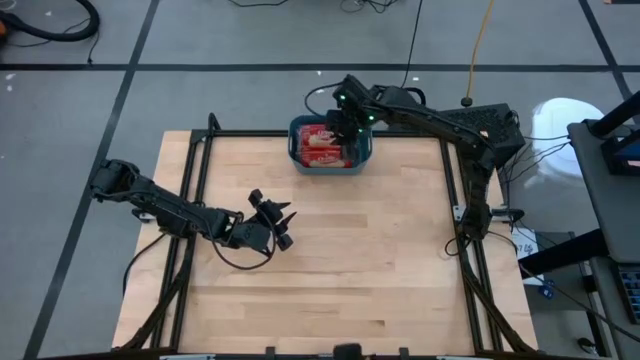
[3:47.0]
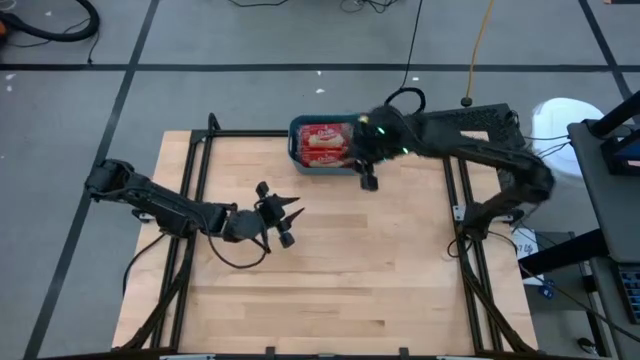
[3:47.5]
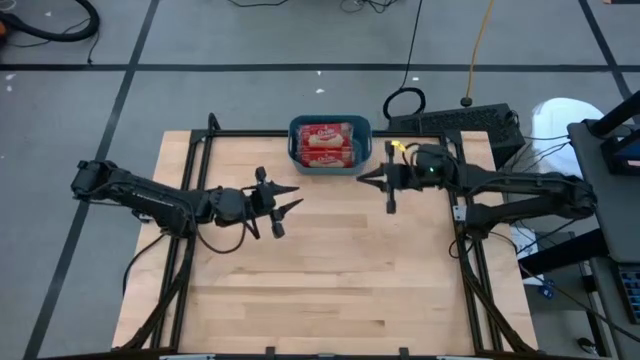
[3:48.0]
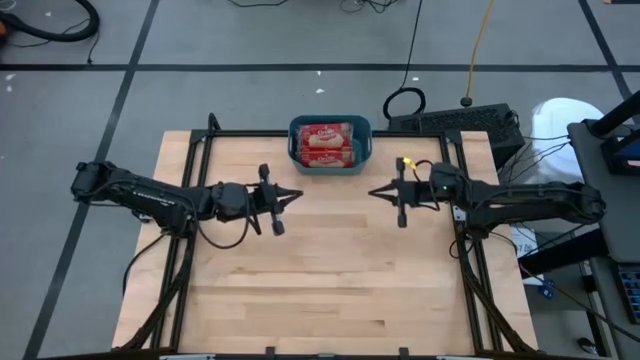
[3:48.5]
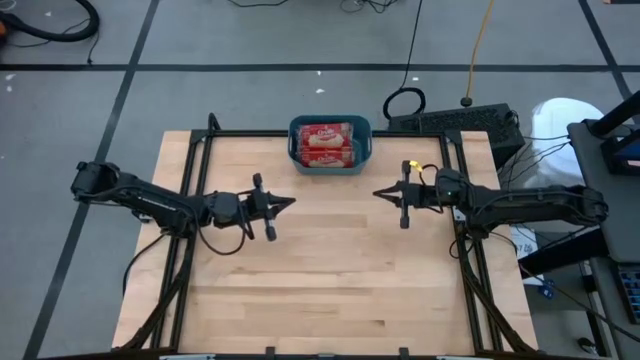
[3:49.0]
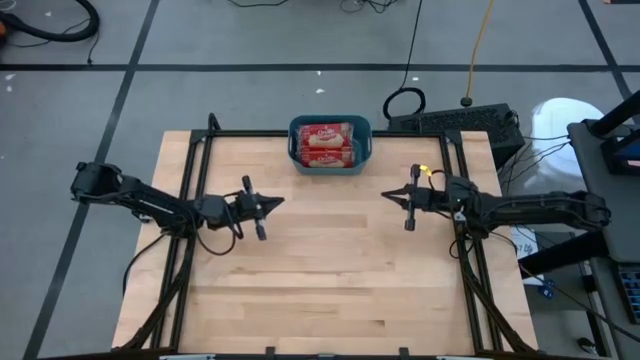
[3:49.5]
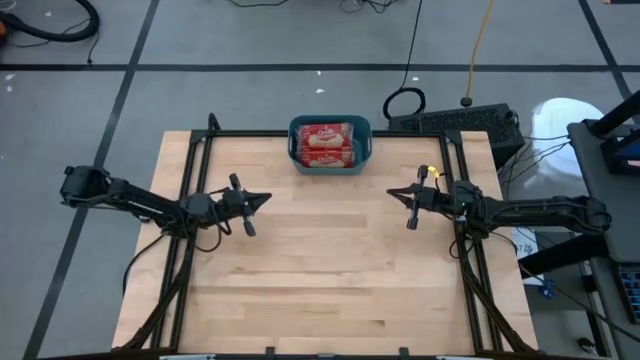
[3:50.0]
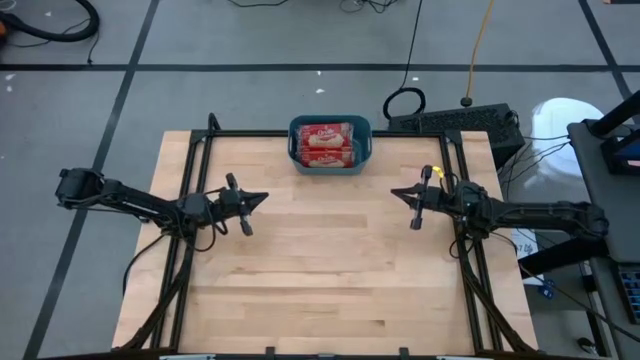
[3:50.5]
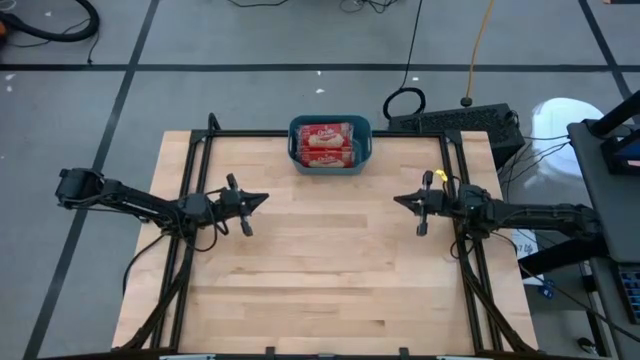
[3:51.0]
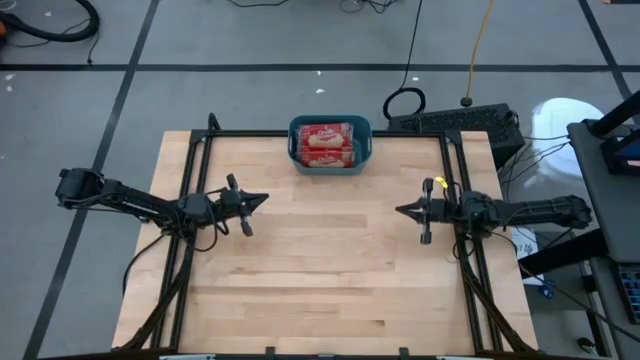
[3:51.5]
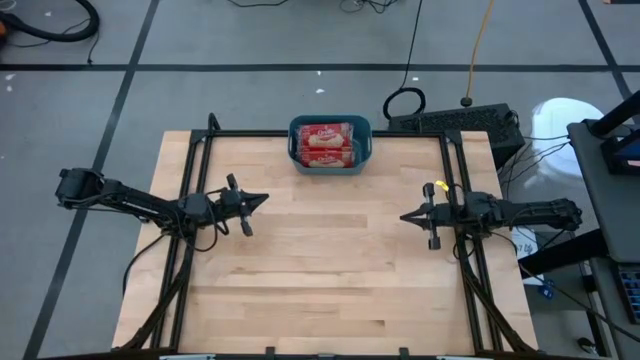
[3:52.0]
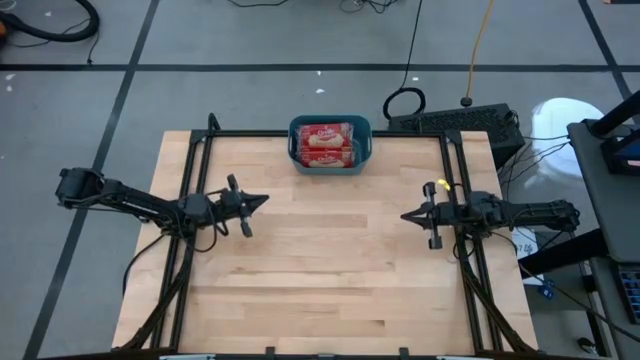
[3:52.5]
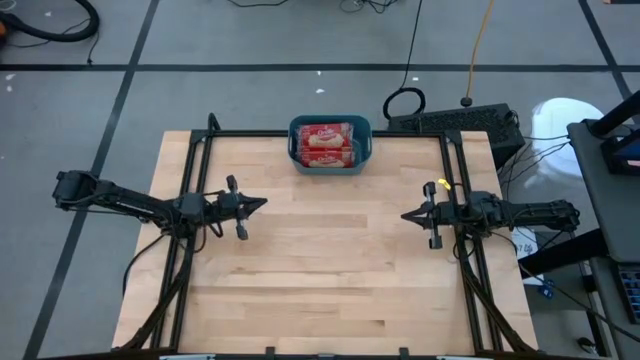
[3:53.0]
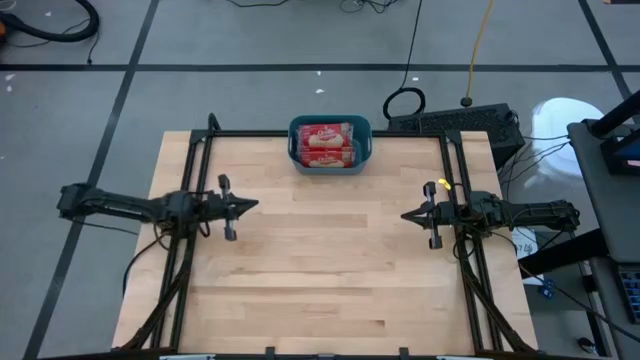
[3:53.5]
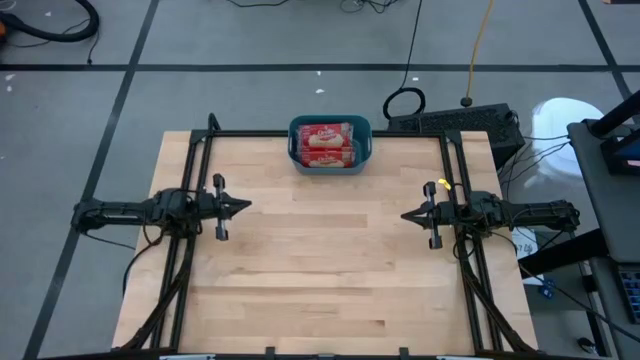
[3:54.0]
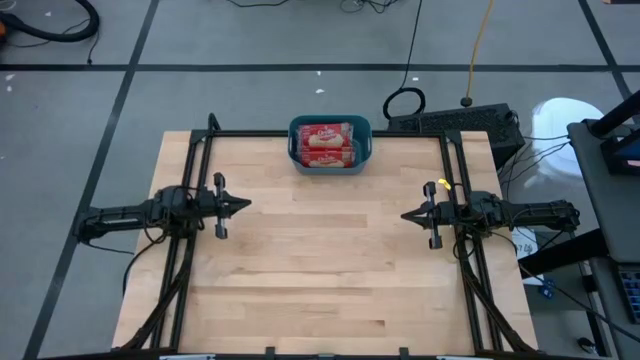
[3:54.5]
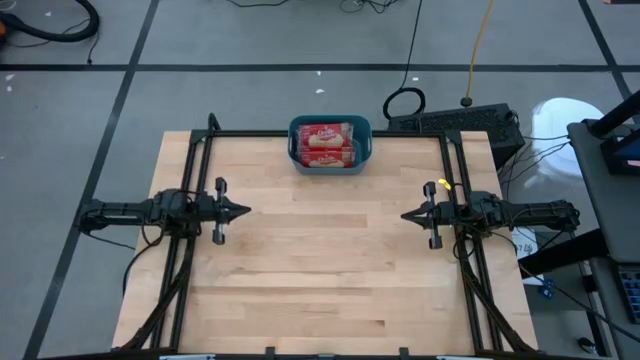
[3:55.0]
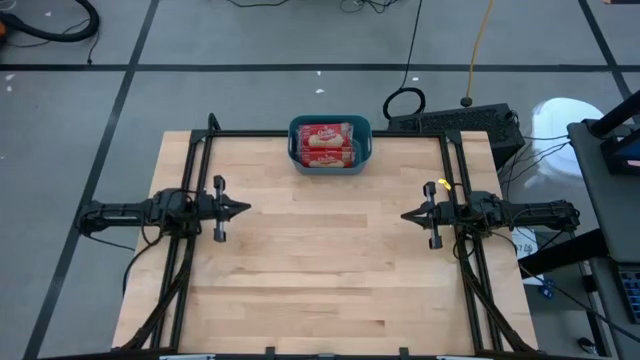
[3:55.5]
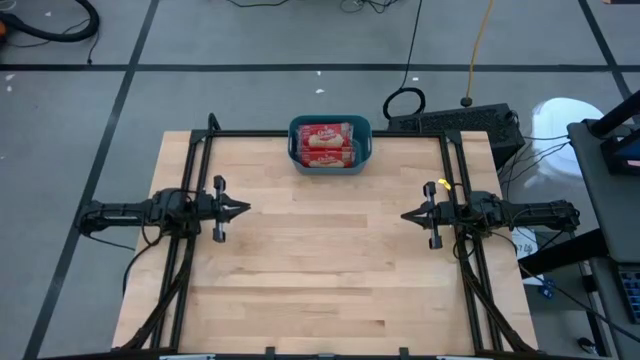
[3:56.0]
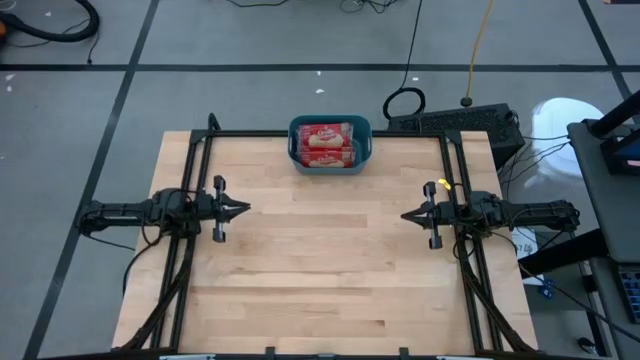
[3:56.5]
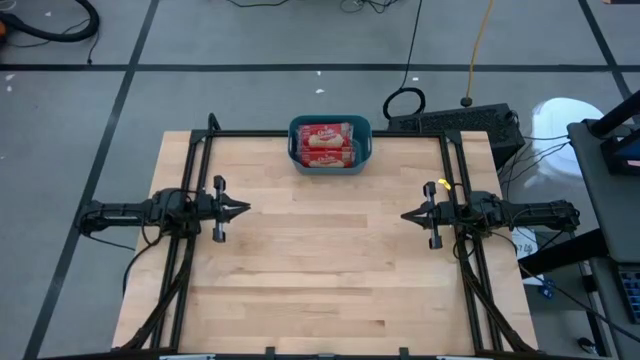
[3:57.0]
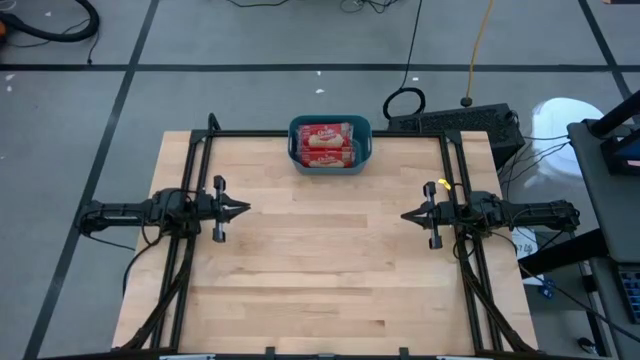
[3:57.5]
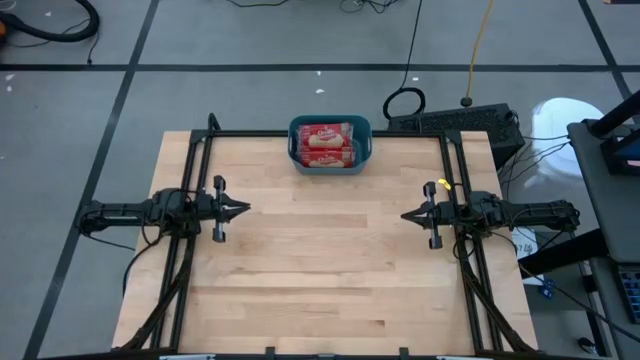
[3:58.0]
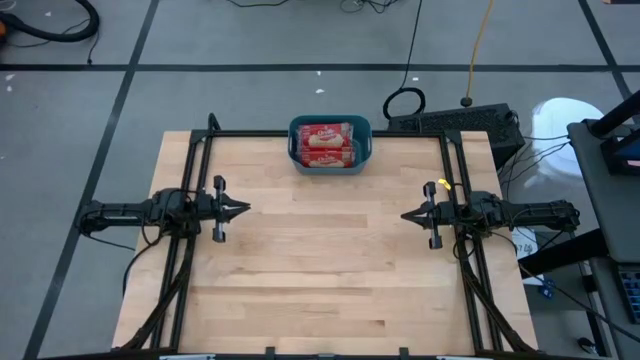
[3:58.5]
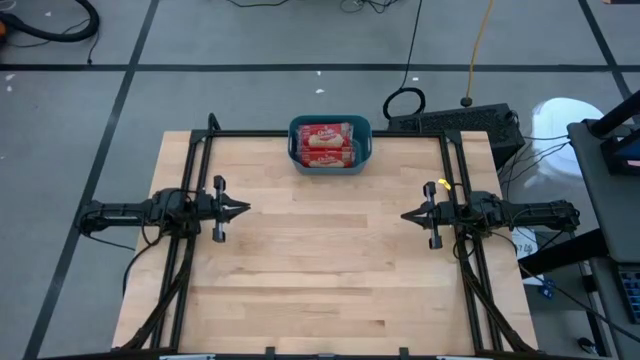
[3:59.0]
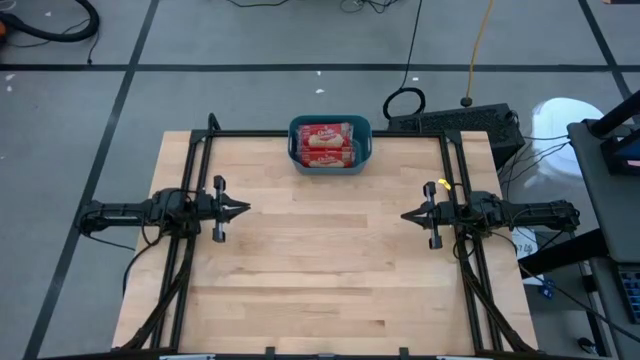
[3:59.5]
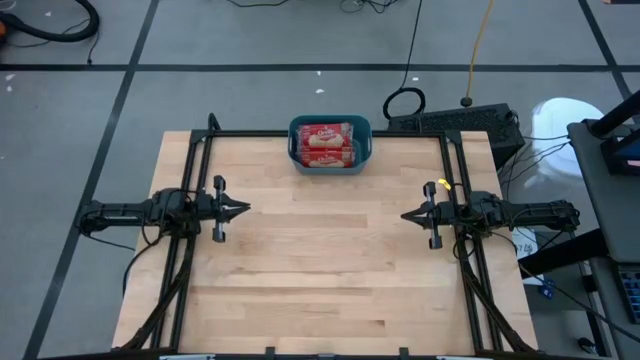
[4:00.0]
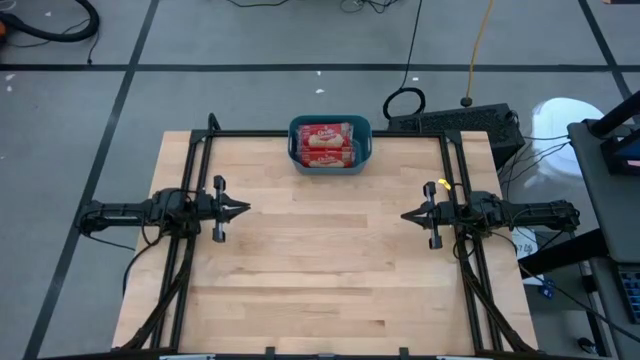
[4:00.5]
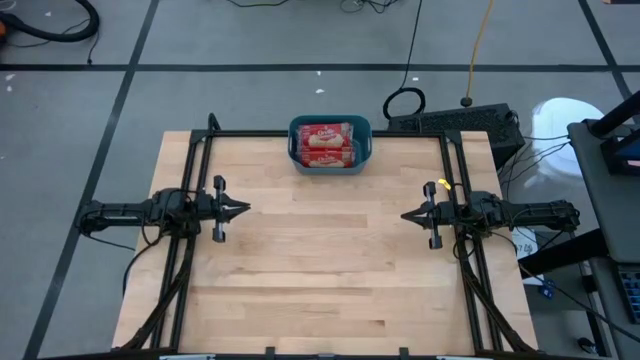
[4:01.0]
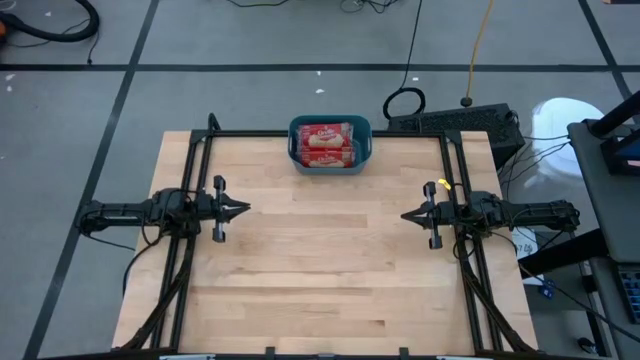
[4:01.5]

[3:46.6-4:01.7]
Task: Sort popcorn bags into baskets
Return to Home Position

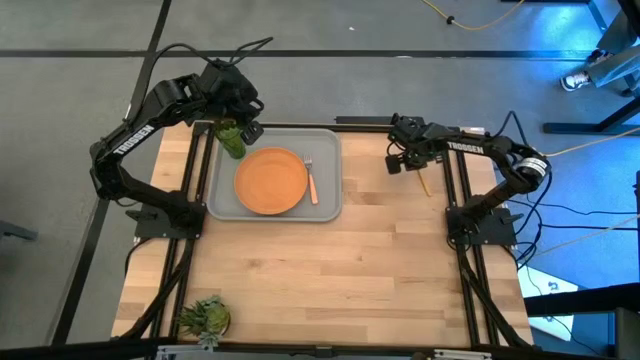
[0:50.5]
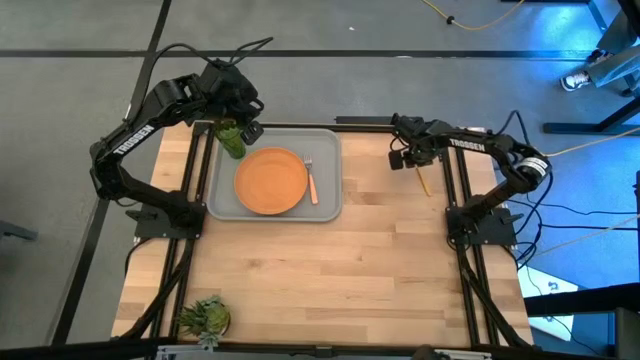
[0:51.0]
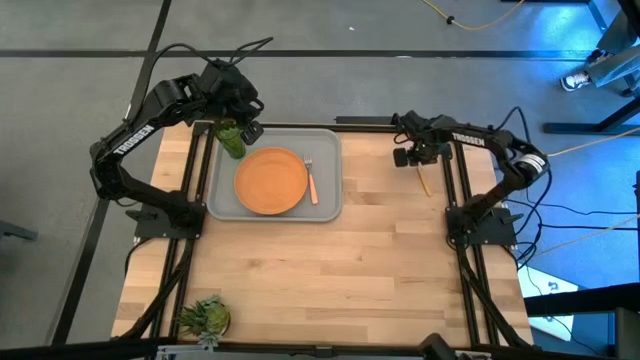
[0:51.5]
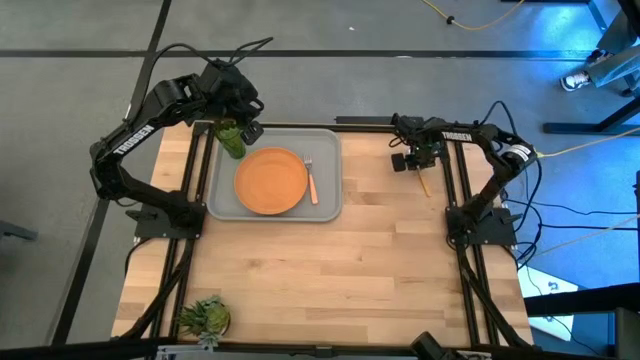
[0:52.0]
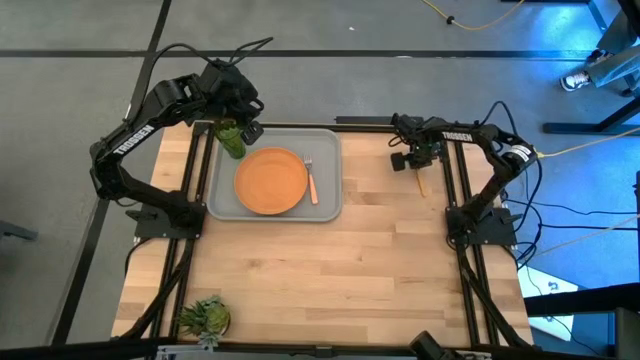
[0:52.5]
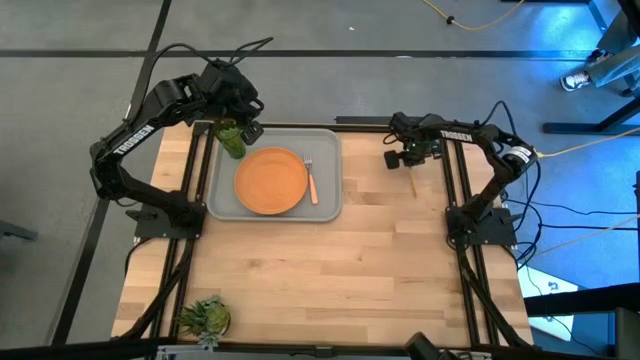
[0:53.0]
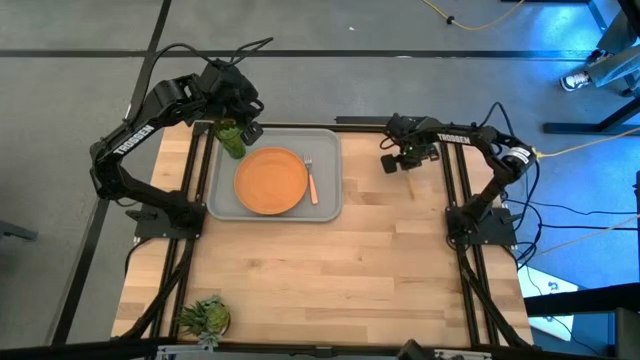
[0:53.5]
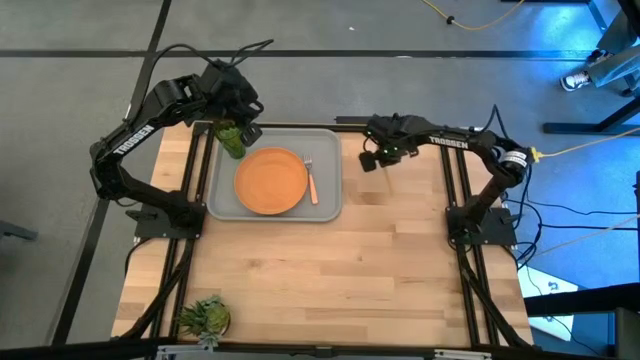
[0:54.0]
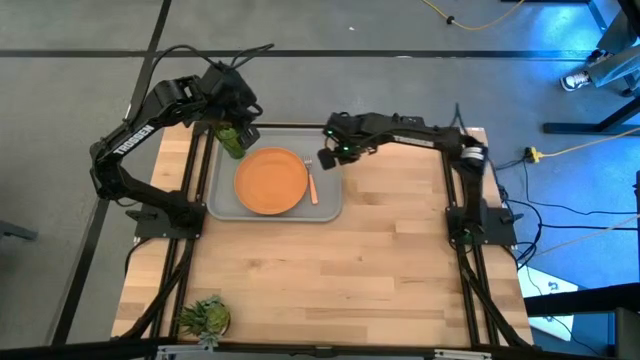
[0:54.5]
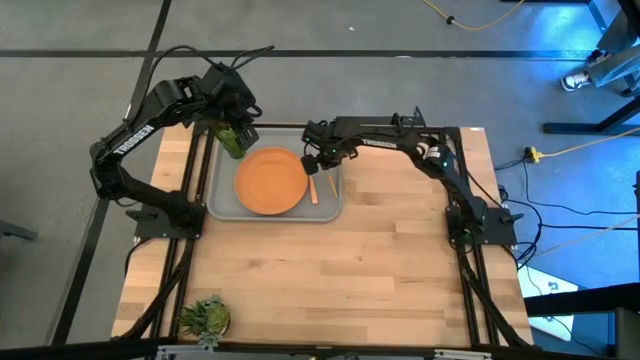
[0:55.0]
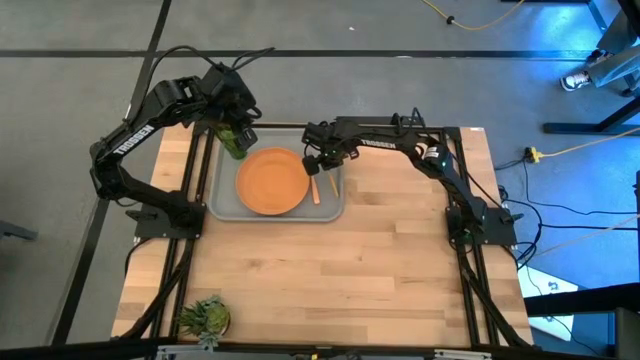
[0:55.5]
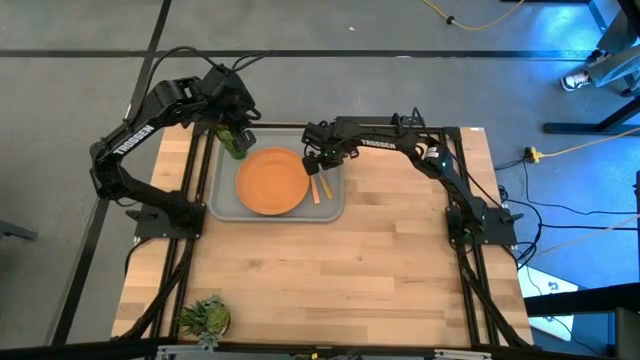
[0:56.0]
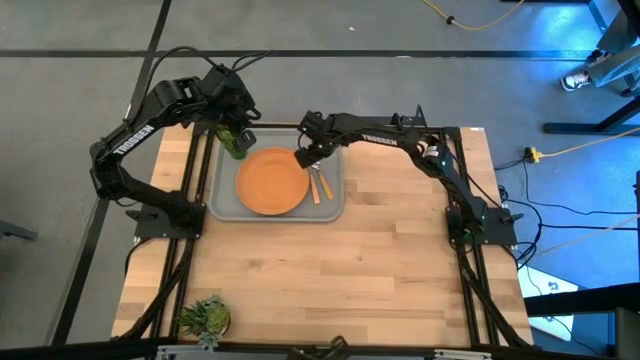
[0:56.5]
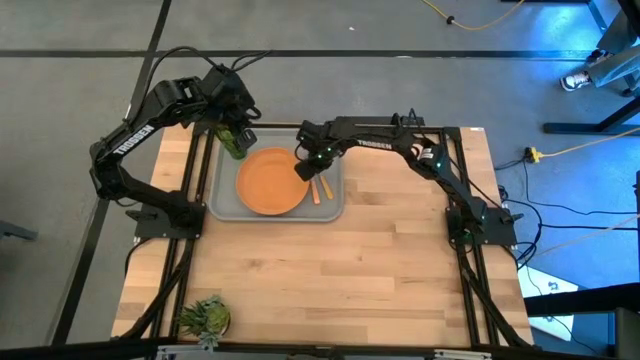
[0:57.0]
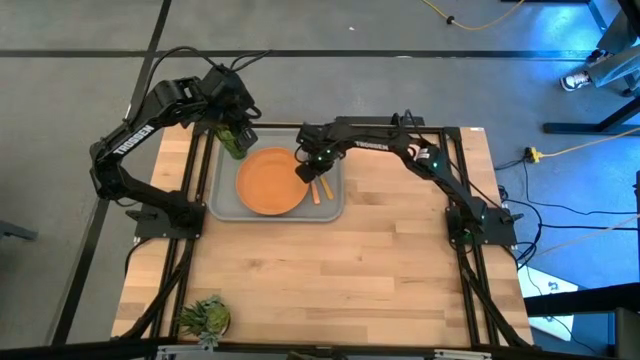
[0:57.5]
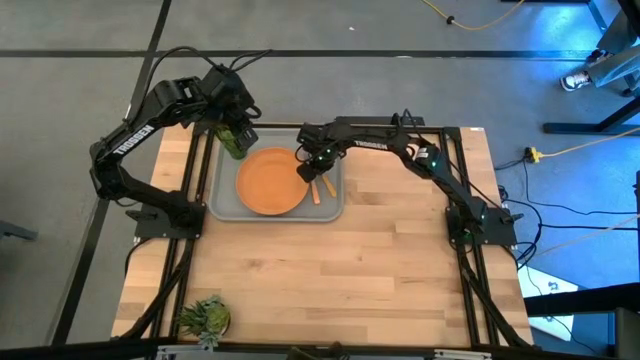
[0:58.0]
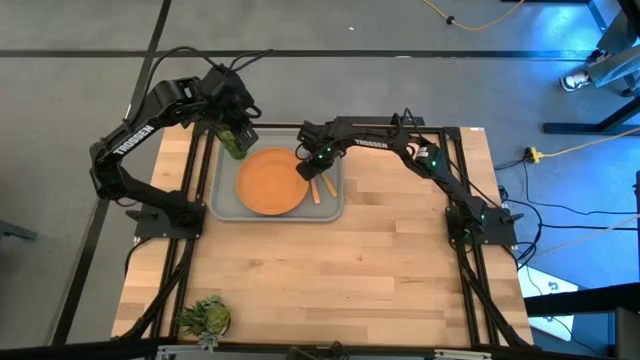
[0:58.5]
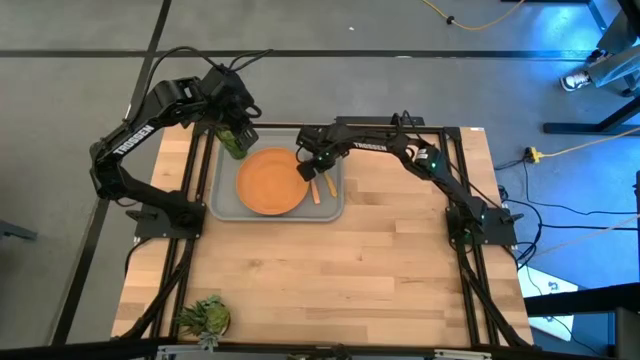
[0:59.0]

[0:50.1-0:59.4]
Task: Pick and place plate/cup/fork/spoon on tray
Put the orange spoon on the gray serving tray to the right side of the orange fork
